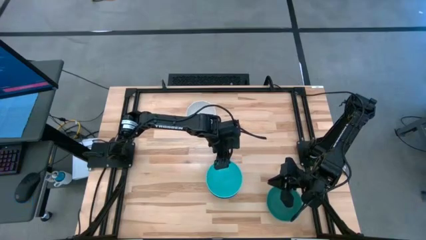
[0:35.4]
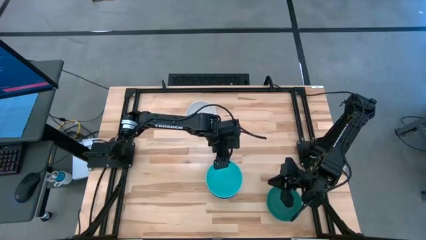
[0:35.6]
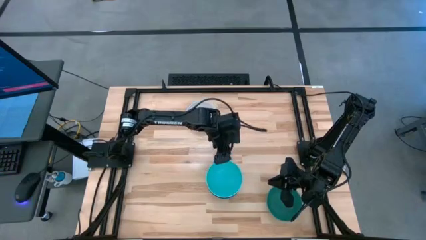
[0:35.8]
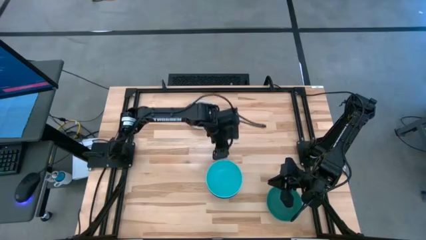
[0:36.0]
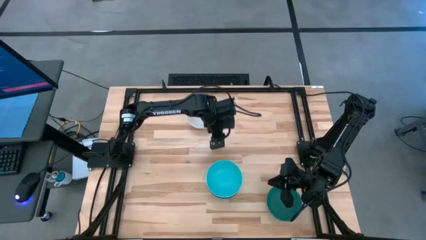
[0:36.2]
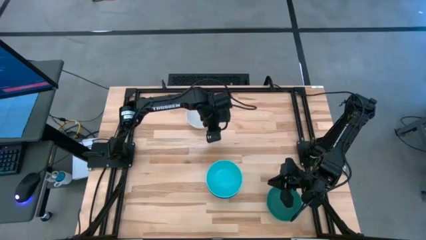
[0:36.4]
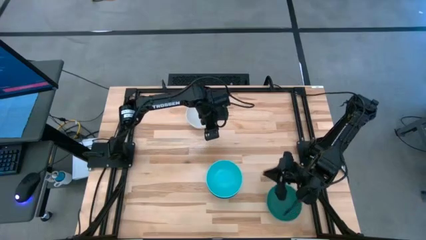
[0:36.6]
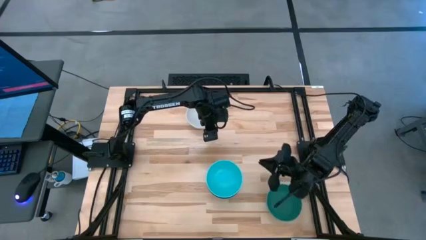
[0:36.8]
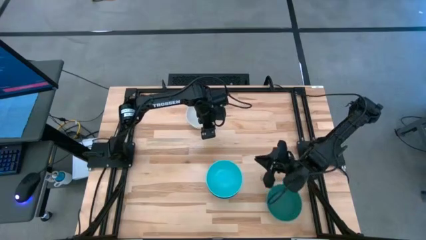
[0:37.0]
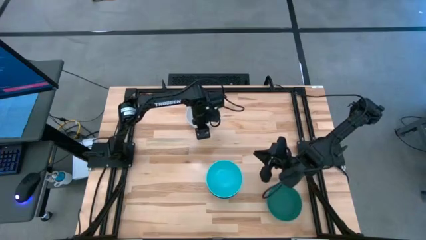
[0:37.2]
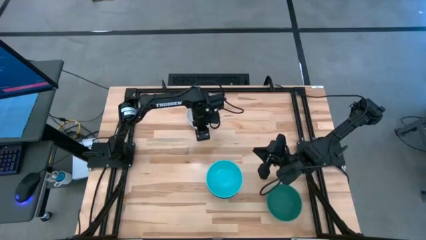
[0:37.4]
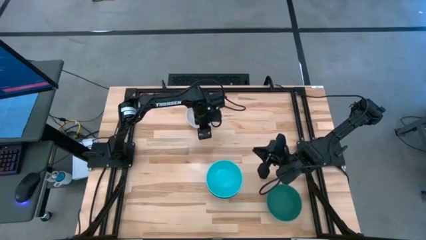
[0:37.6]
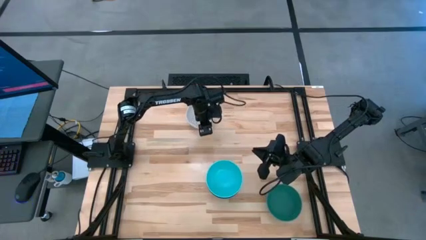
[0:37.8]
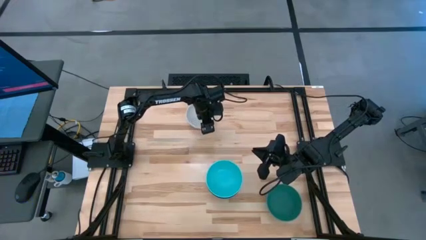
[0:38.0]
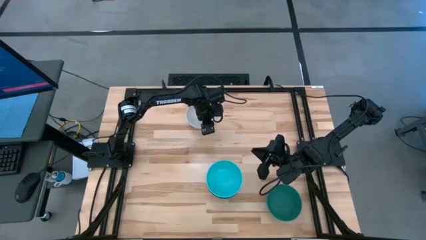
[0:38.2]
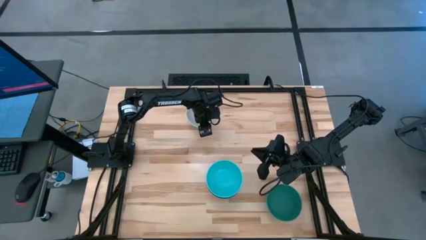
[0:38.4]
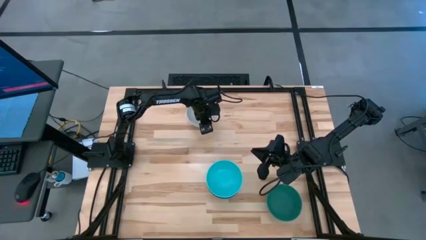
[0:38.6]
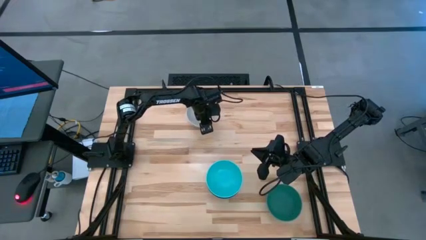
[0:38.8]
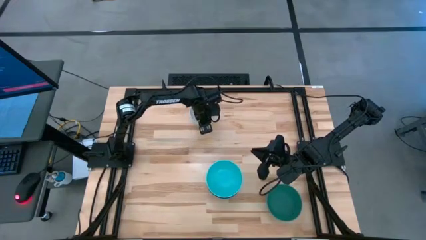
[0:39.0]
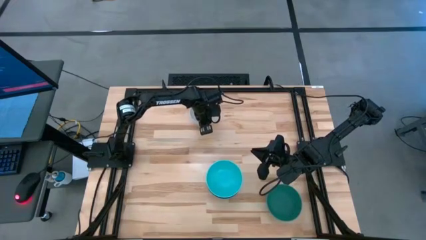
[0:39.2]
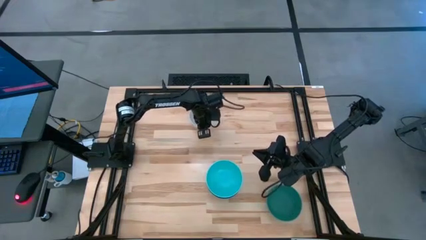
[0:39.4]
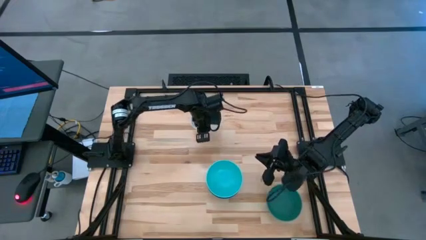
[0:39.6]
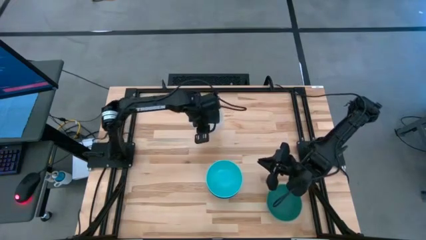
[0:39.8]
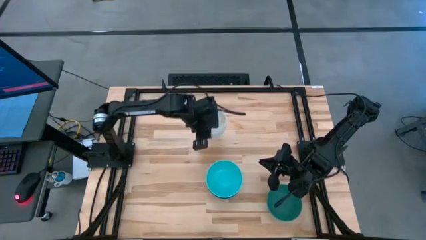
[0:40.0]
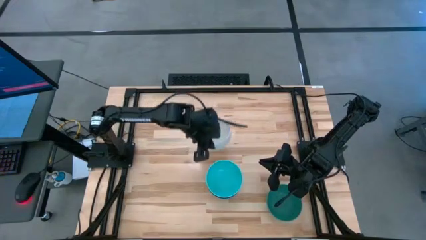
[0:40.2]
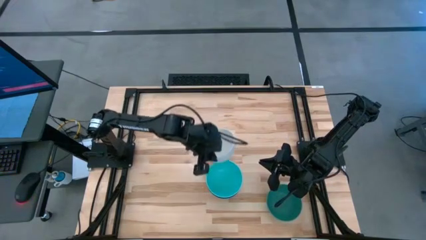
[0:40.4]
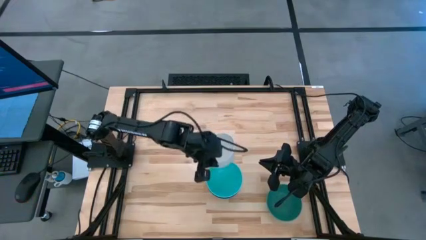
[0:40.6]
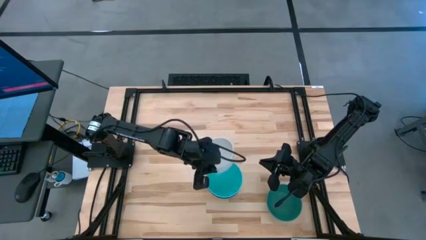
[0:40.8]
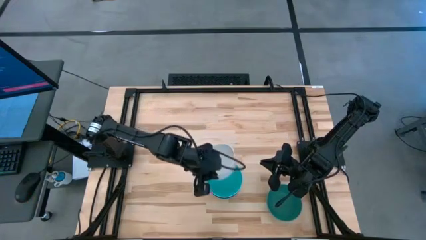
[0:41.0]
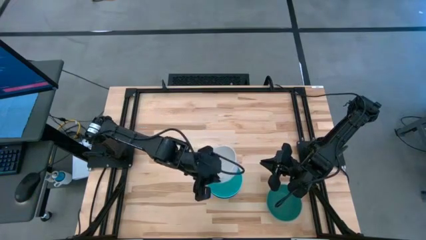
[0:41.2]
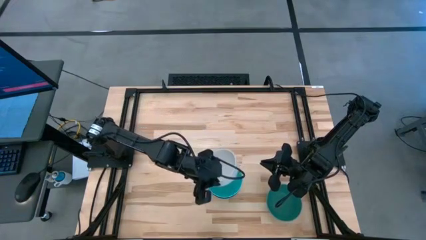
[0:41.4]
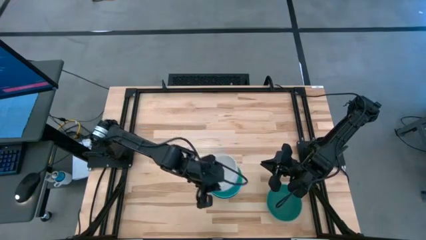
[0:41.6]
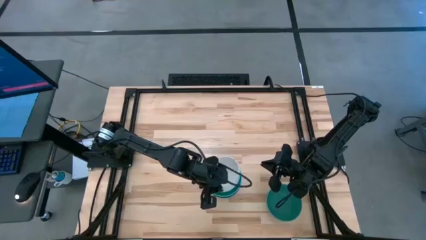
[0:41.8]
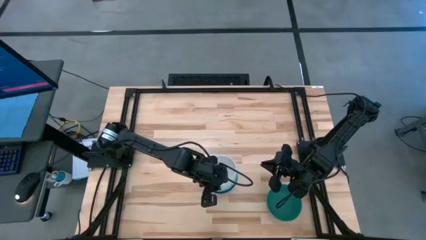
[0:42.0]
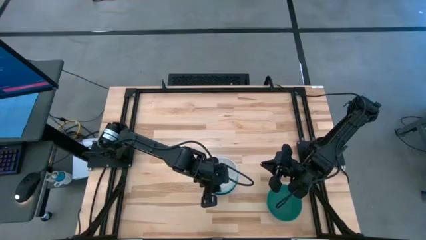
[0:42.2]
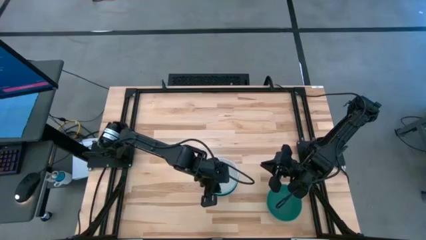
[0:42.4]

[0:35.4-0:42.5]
Task: Nest bowls inside each other
Stack the white bowl on top of the light blue bowl

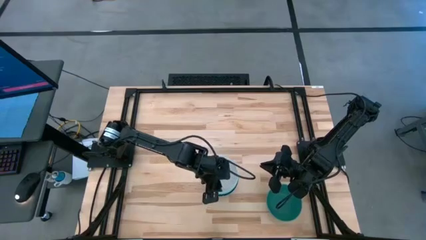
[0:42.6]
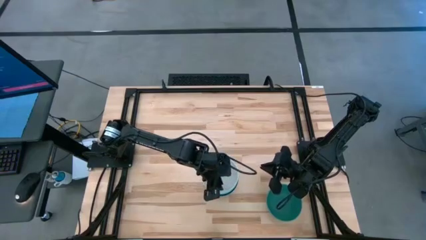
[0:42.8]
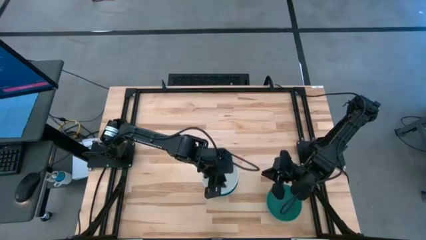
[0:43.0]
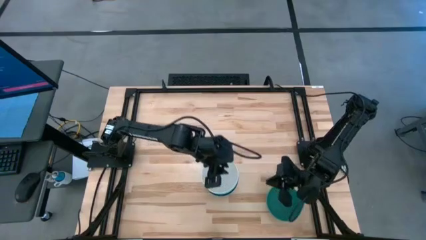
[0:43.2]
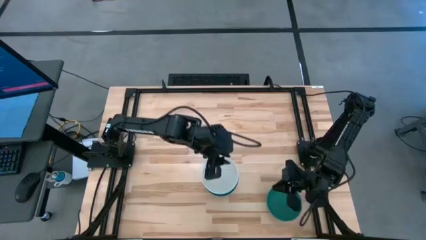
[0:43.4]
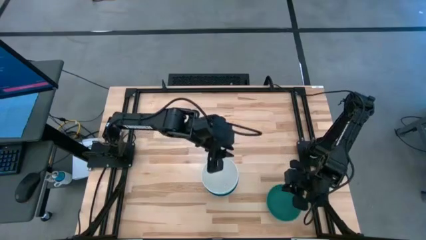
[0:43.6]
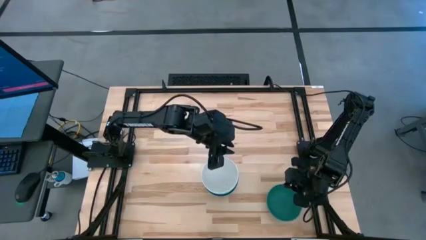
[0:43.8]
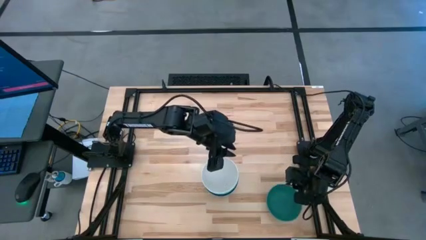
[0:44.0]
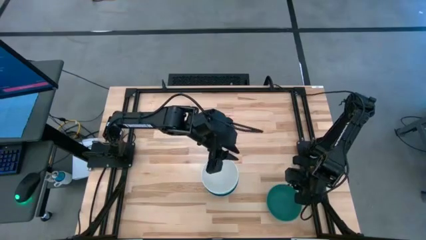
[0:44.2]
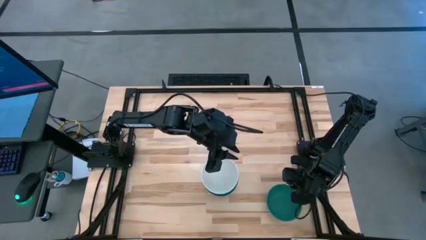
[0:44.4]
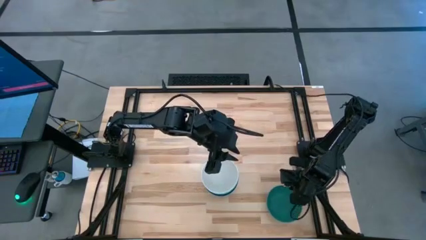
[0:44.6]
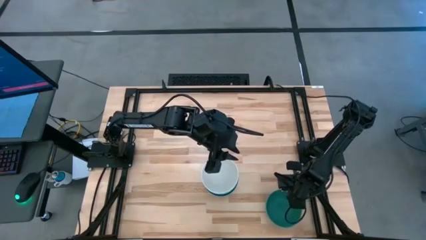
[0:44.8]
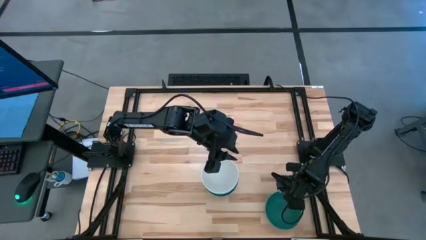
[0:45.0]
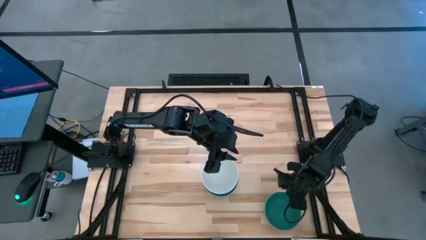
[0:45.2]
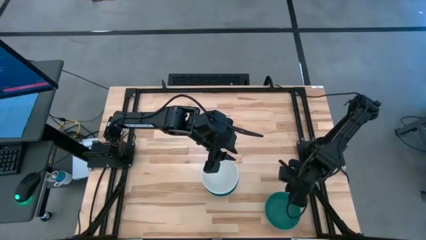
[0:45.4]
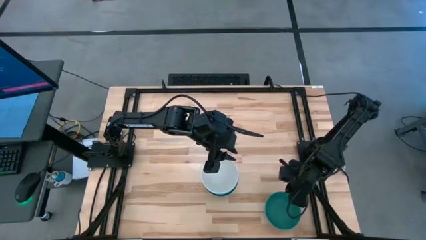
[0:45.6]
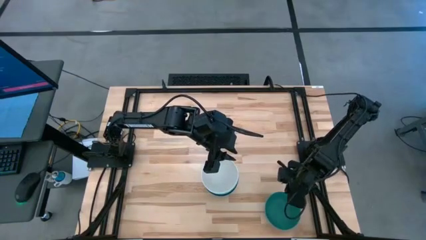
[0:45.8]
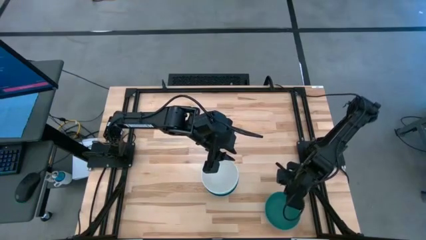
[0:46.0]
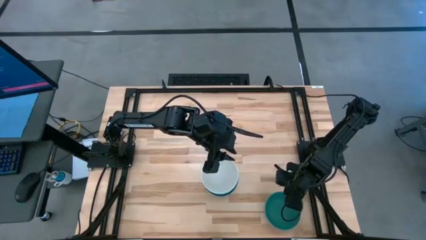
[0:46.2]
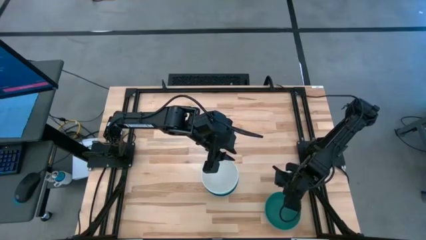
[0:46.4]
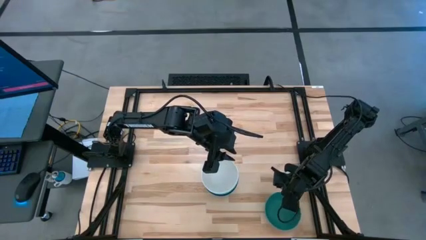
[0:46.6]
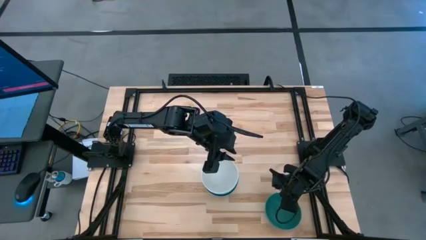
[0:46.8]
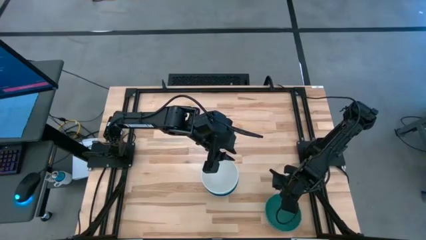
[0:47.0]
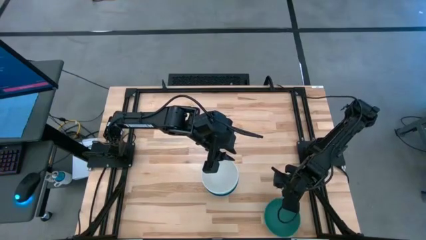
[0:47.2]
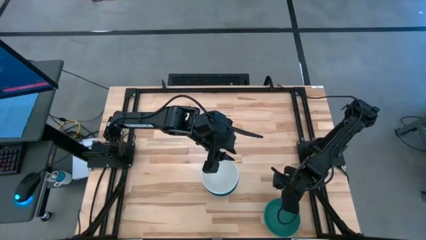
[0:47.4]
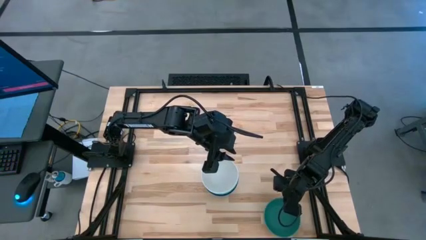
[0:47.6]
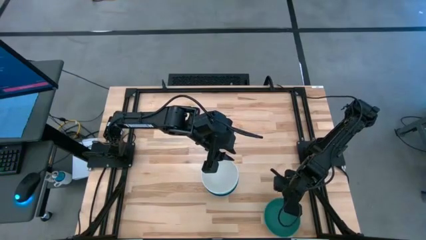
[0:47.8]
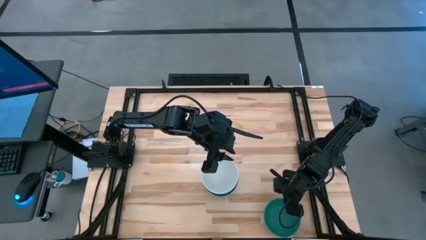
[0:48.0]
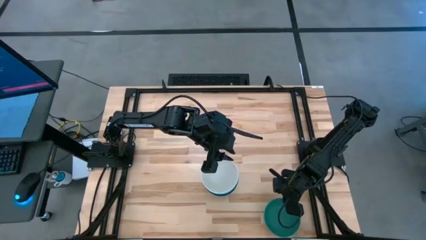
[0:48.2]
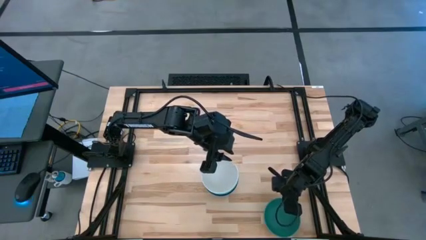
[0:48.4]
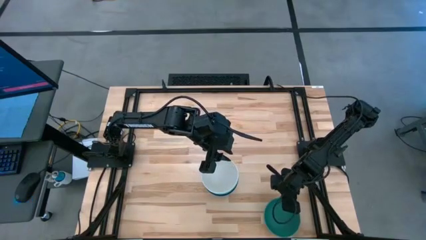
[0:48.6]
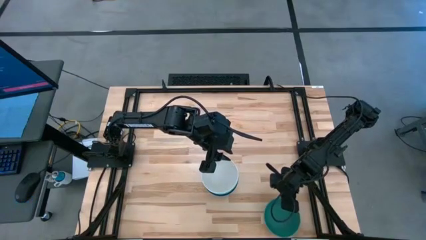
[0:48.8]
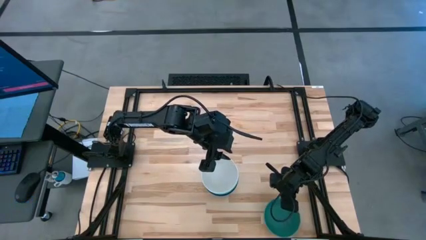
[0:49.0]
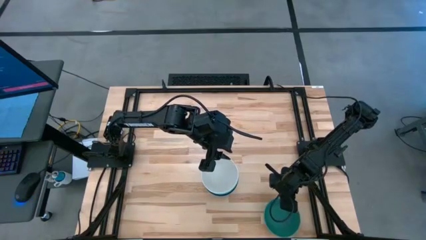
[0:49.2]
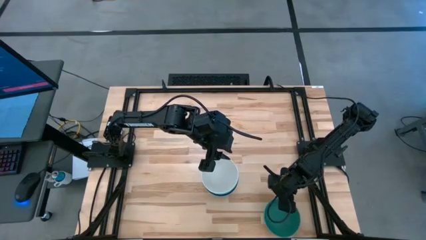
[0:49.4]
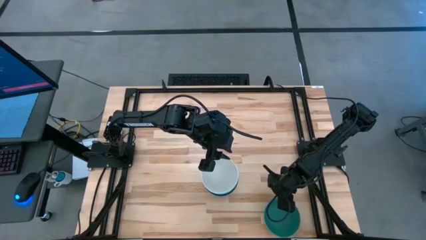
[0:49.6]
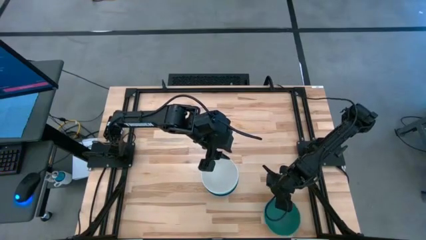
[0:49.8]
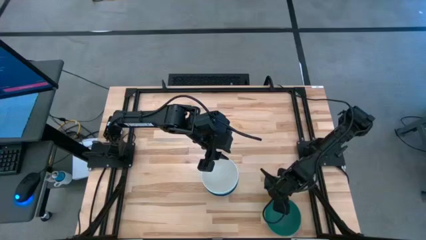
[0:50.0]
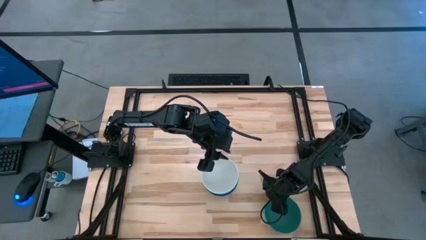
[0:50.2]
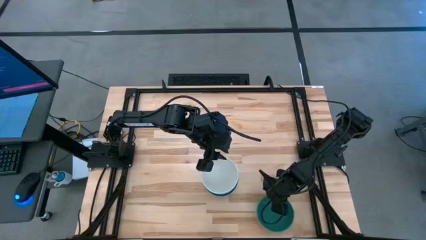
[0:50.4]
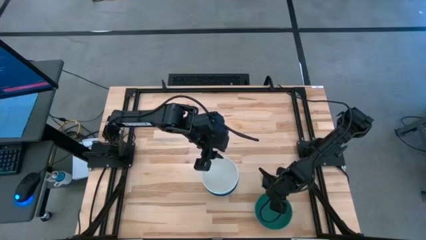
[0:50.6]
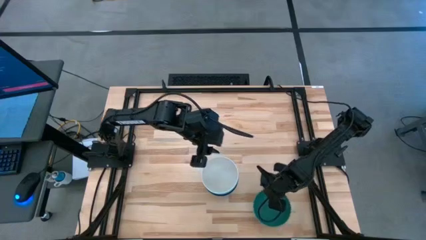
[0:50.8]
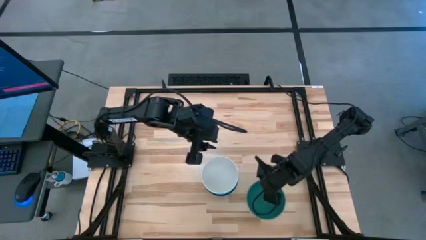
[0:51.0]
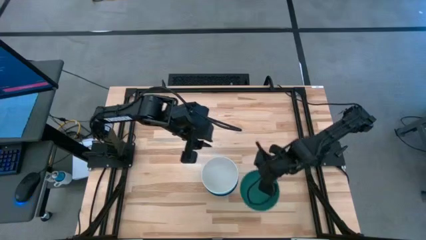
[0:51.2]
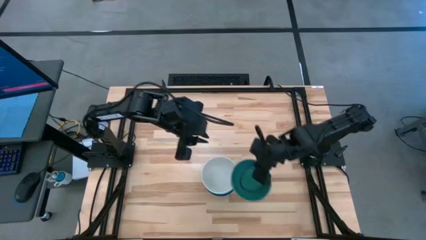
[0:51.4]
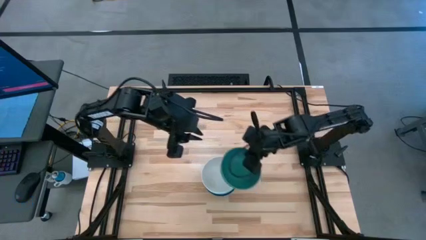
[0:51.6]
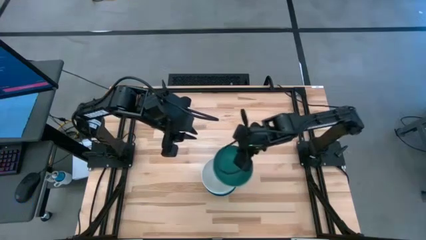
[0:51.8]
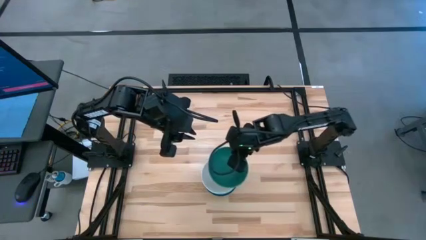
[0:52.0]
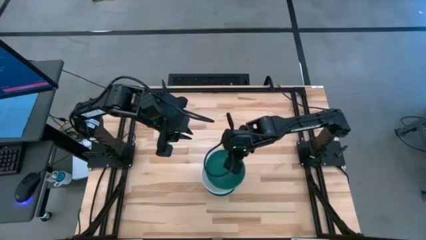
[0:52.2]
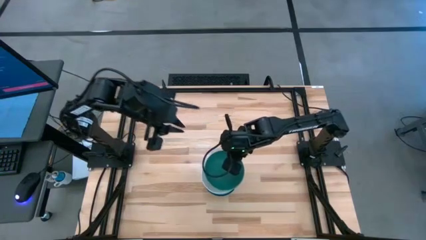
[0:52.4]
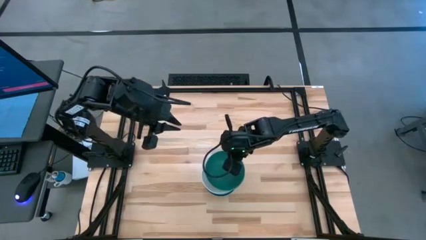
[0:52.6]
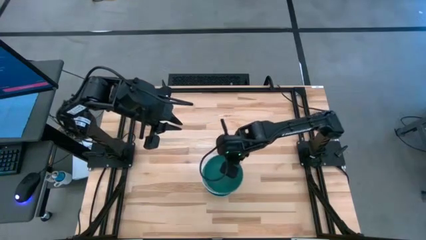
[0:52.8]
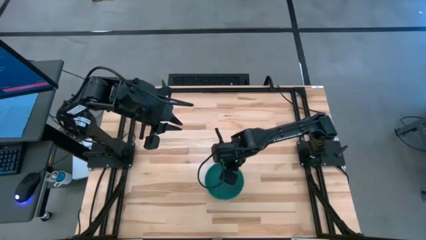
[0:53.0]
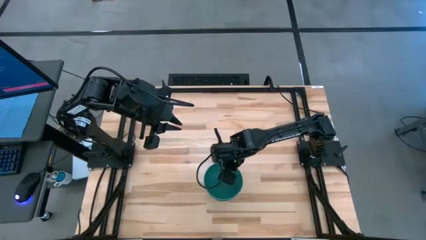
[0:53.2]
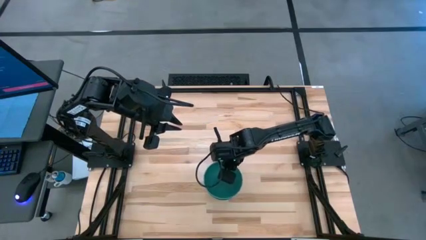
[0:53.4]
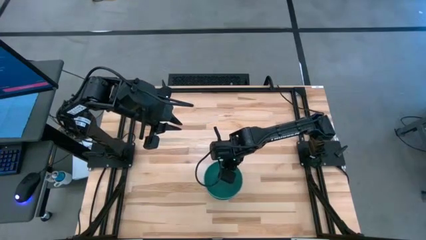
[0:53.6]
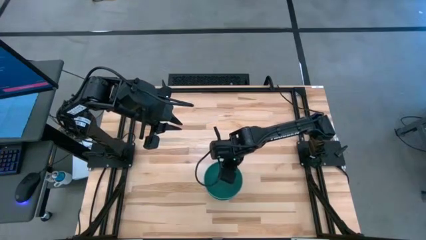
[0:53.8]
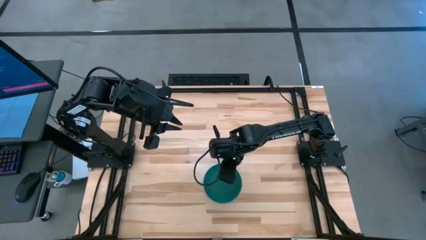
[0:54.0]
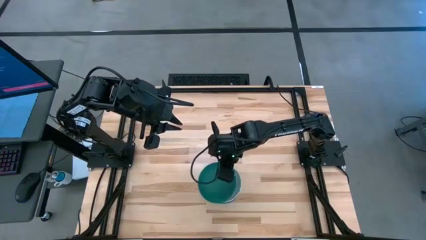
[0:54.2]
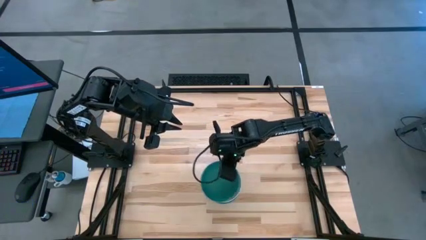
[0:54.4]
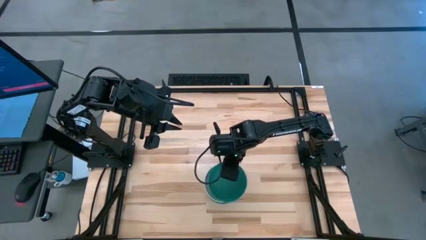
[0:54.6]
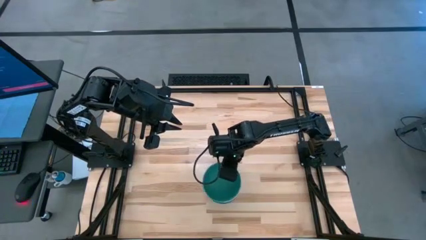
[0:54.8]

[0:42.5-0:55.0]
Stack the green bowl on top of the white bowl
